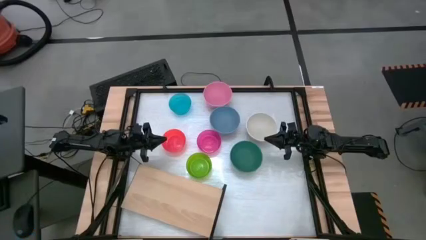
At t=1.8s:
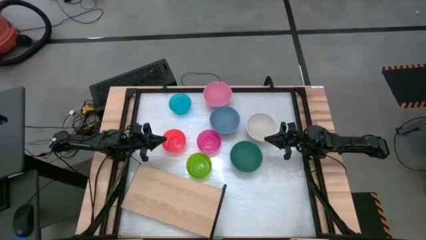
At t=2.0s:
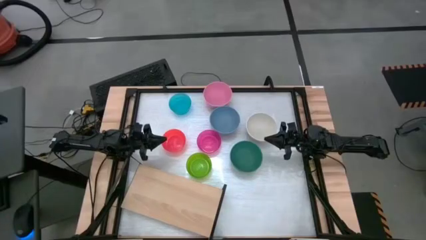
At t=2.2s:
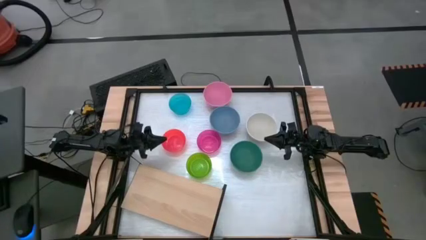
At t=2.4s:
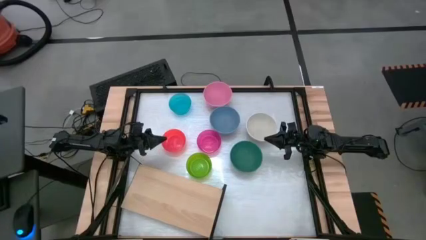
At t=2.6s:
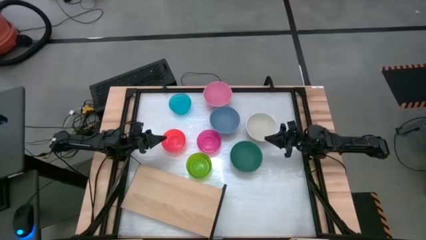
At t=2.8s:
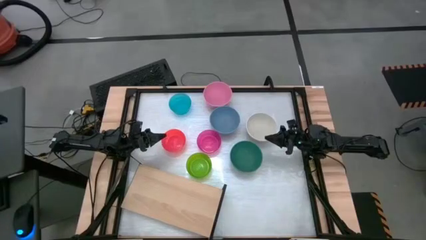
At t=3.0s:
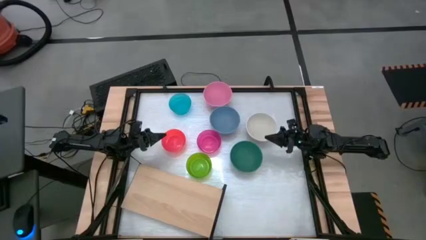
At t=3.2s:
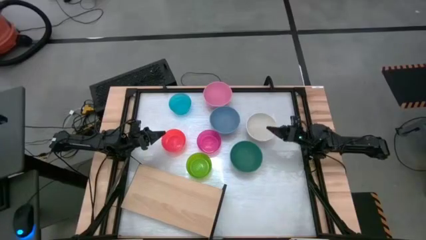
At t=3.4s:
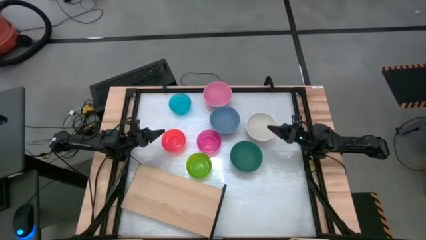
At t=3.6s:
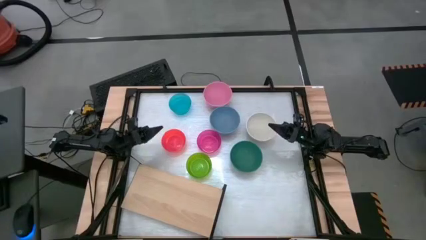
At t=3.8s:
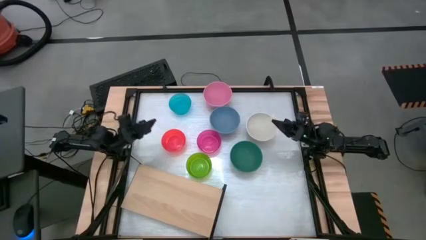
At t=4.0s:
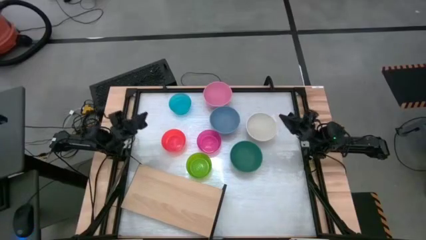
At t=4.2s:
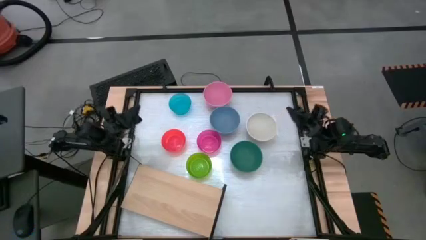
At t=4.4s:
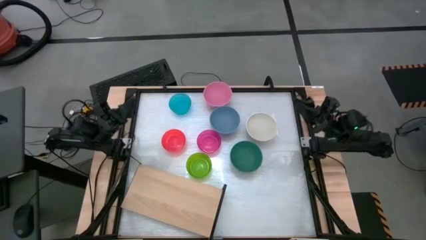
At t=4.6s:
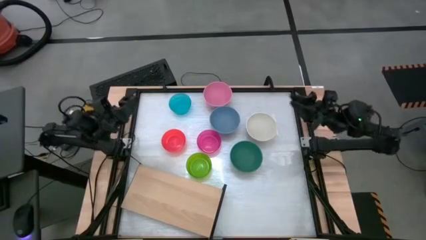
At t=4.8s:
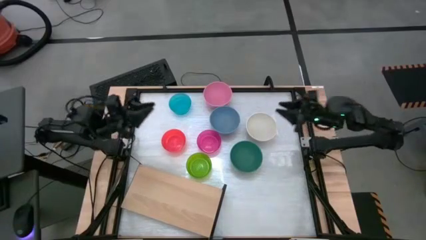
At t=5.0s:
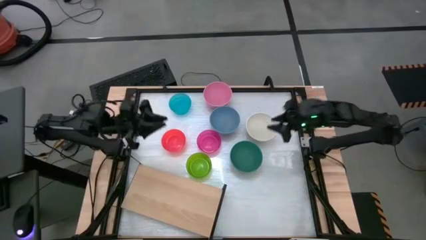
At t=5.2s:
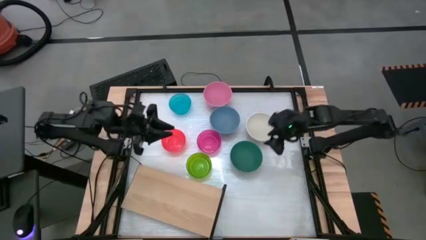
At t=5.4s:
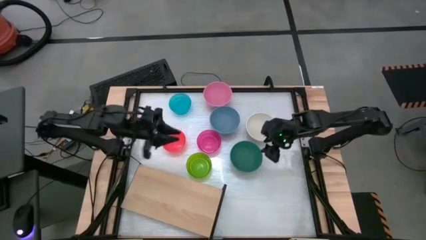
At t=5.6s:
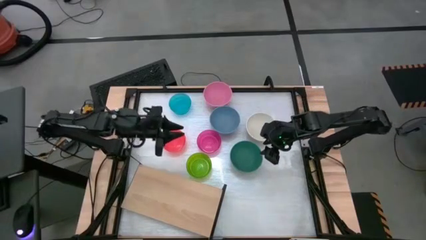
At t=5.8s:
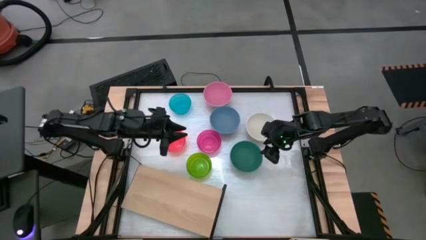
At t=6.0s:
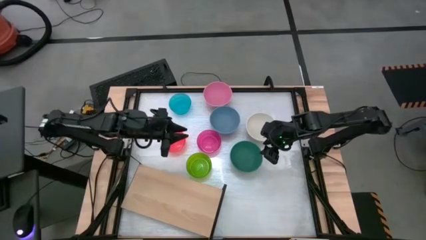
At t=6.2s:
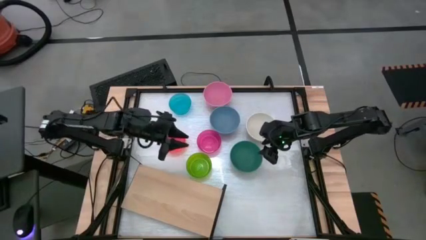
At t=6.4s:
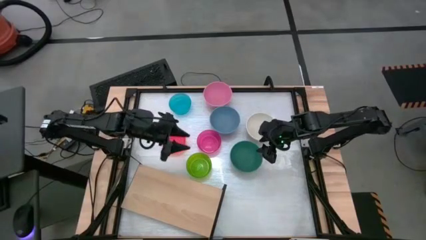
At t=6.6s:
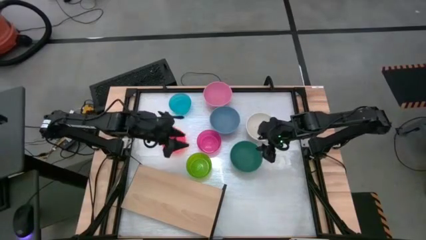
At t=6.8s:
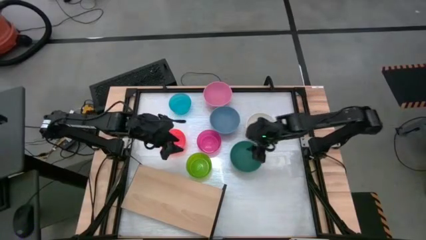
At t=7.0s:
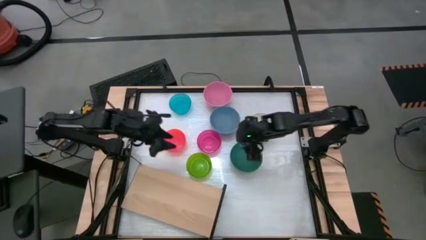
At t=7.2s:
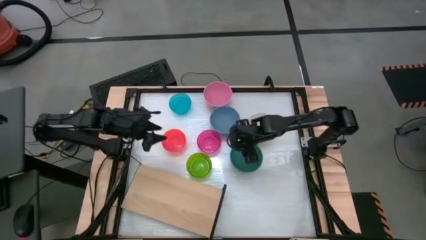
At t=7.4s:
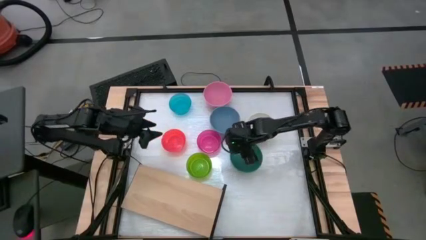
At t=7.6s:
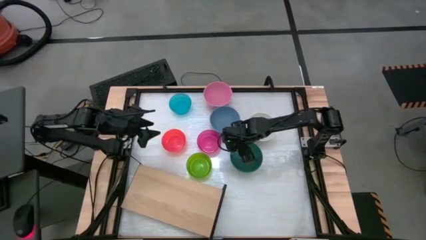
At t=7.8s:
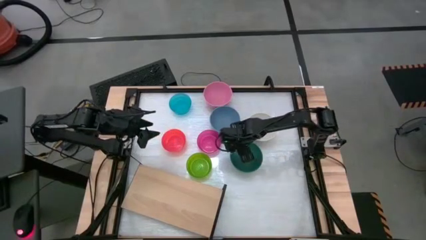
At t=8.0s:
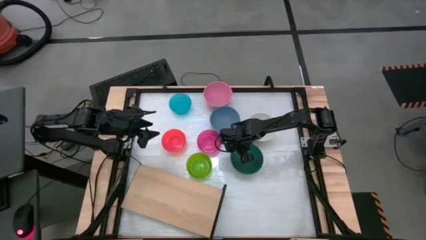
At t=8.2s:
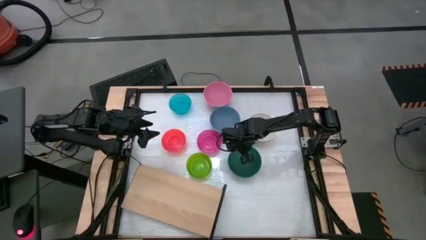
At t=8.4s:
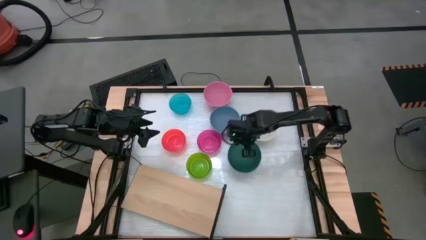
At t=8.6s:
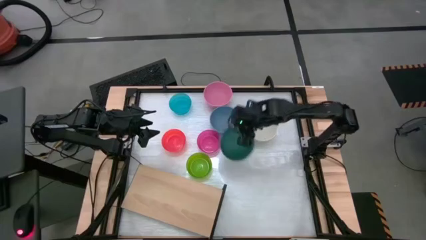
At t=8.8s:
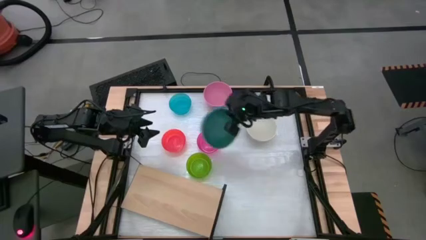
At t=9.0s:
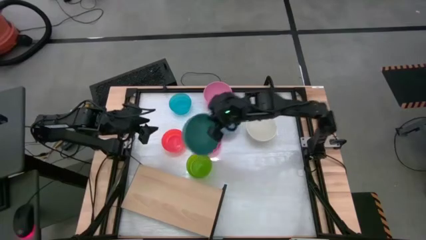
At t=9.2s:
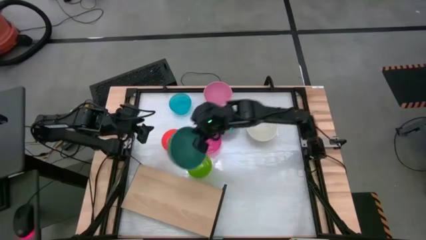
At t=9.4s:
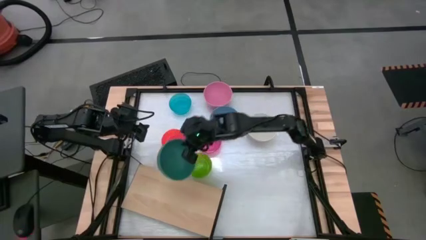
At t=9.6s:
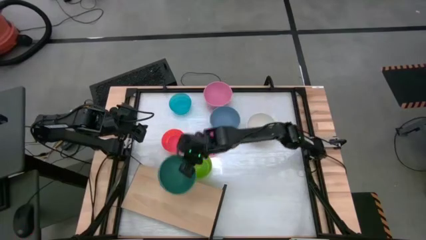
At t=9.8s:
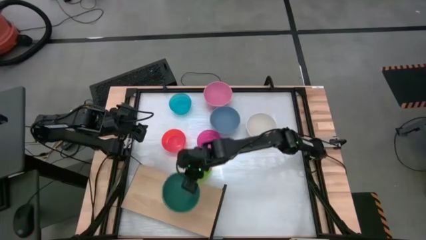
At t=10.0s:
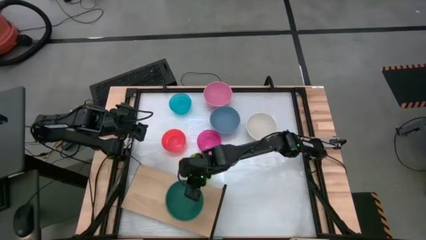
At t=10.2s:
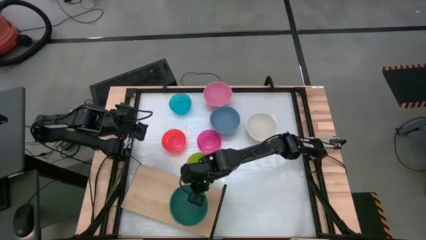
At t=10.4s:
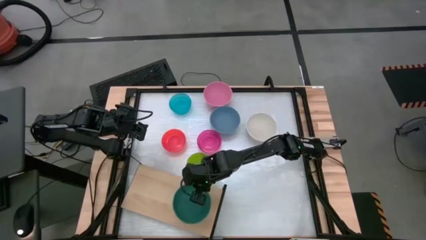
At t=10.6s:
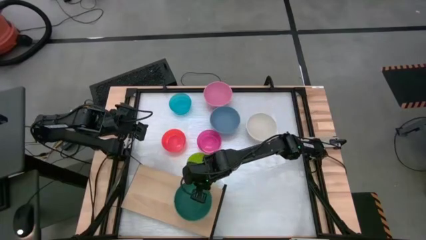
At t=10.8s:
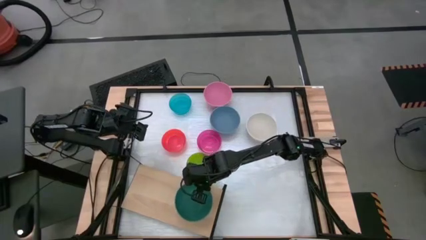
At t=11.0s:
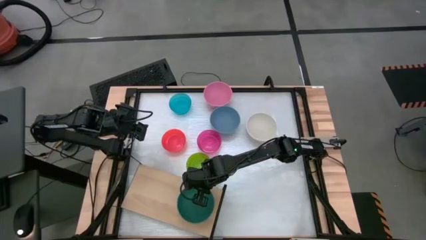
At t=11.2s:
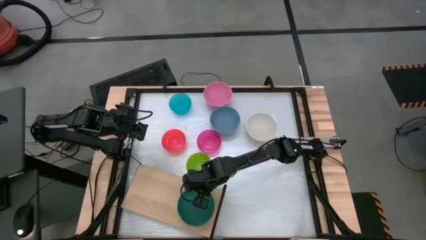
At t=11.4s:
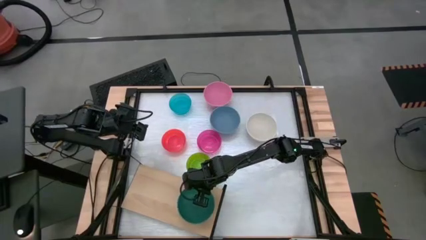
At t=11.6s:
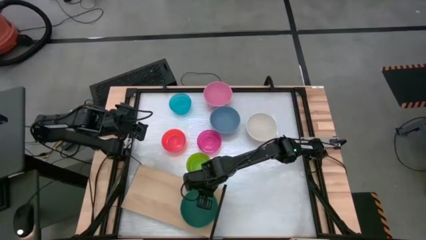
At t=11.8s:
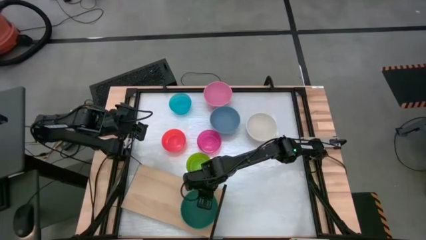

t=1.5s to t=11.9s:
Task: Place and stack bowls onto a shelf
Put the dark green bowl on the shelf

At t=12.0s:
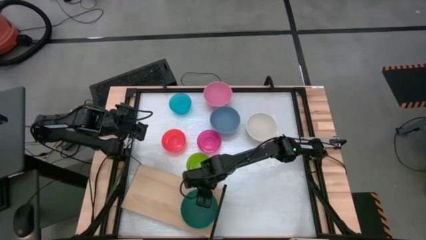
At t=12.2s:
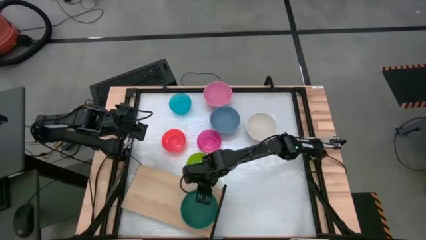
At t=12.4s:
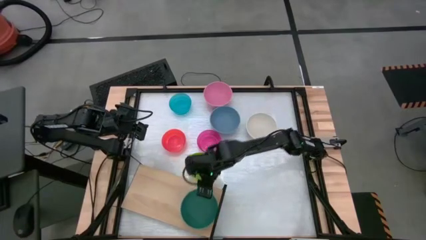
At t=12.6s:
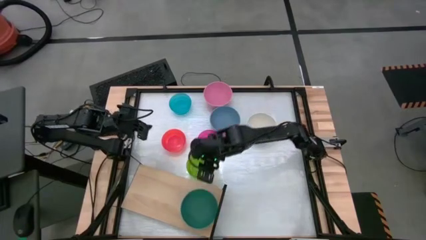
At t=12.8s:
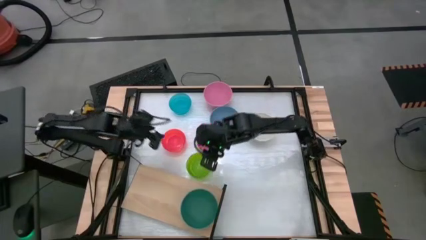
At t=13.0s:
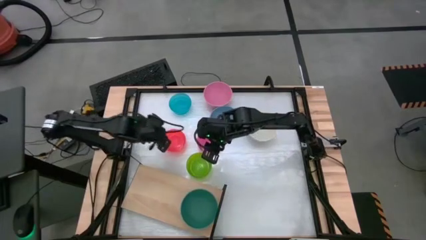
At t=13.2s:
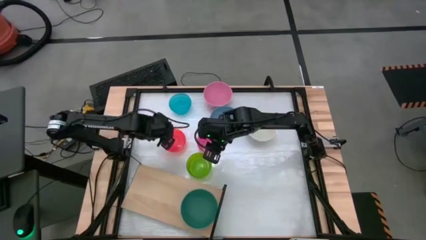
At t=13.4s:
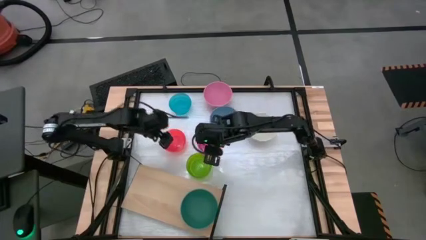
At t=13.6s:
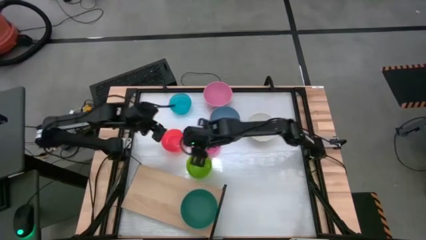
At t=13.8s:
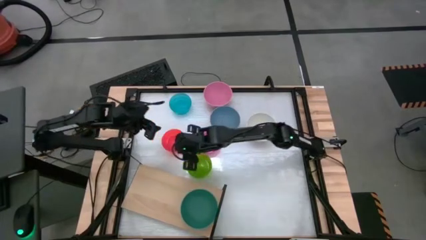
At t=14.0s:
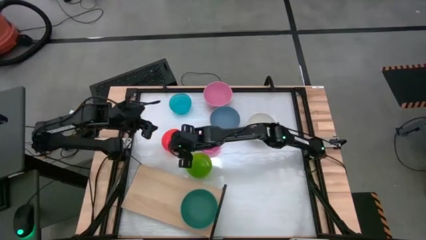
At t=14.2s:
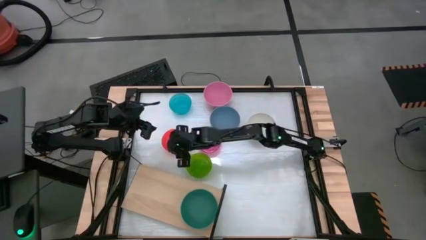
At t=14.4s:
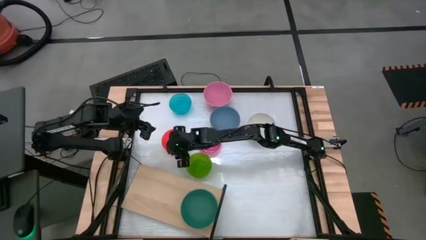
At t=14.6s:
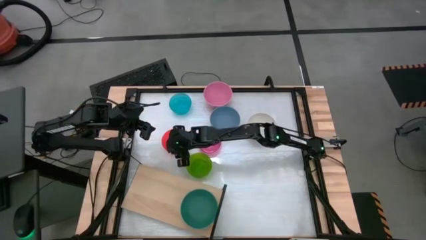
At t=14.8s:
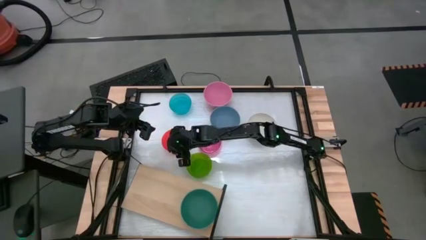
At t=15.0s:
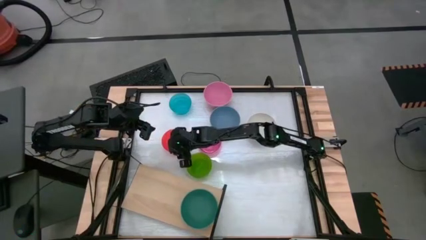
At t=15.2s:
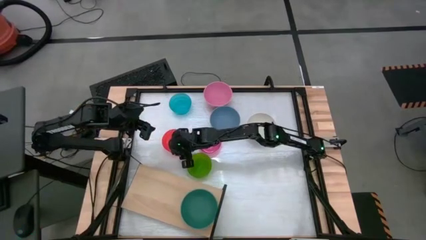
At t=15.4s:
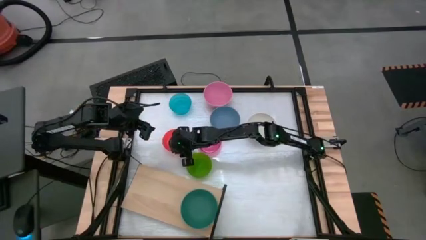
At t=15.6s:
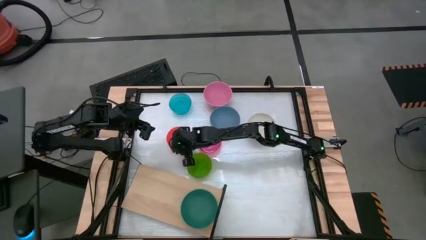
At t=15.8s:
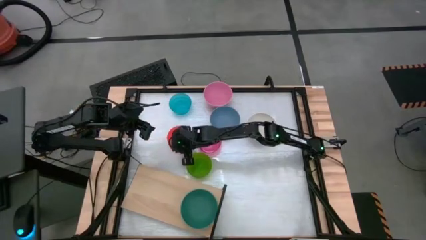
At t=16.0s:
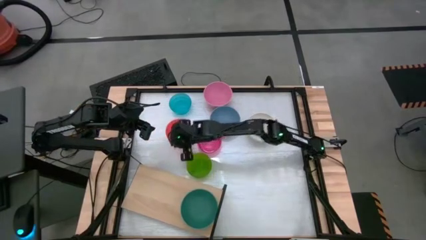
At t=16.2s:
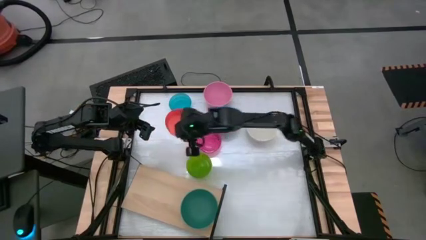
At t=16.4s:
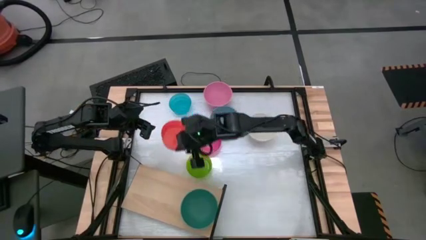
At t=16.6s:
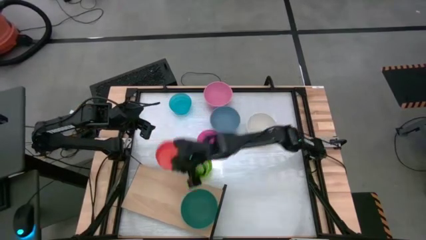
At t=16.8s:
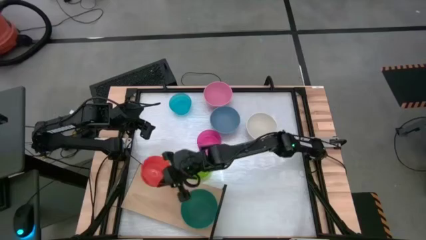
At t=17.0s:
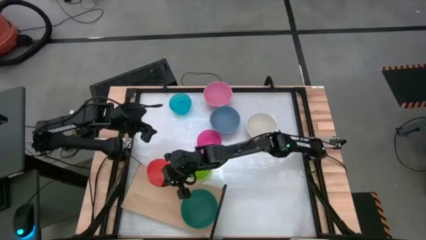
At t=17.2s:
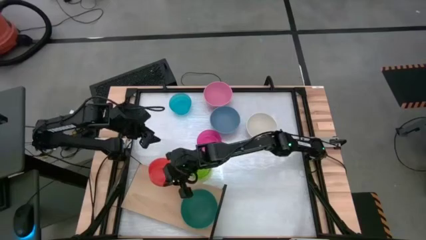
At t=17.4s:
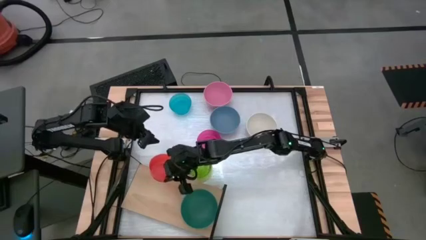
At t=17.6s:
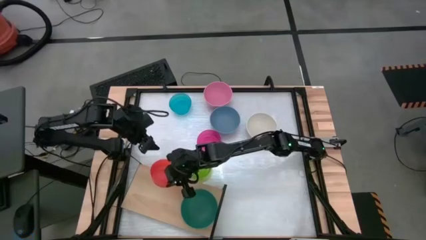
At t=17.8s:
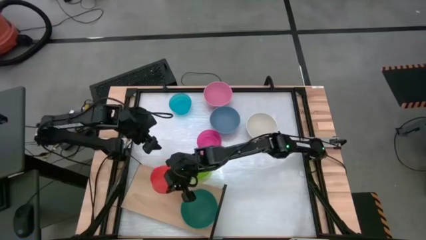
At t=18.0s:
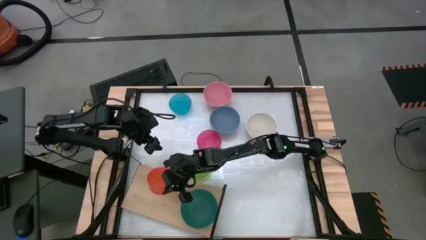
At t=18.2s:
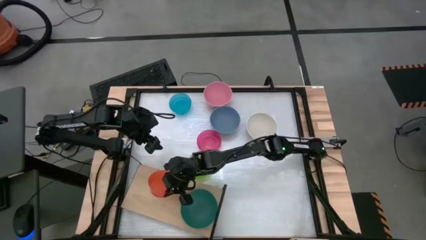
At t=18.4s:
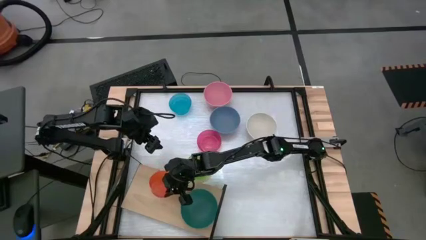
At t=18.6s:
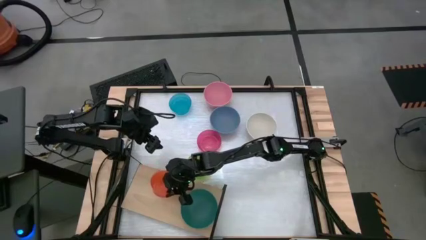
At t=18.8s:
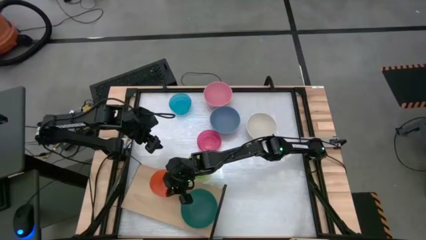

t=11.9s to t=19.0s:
Put the orange bowl on the shelf
